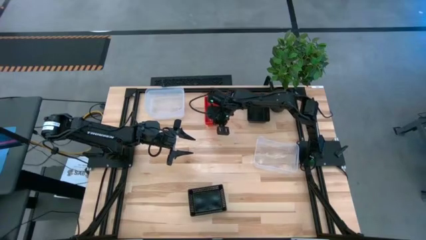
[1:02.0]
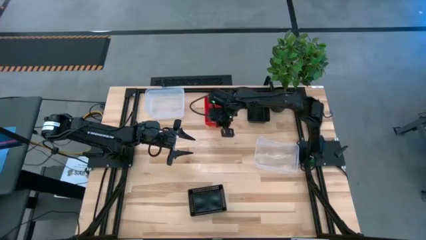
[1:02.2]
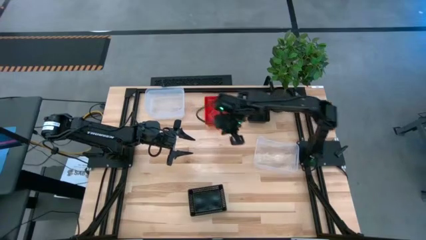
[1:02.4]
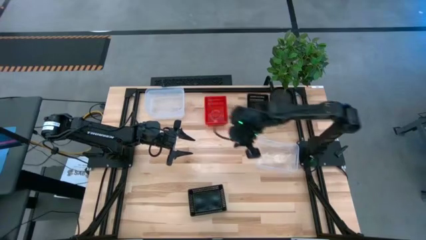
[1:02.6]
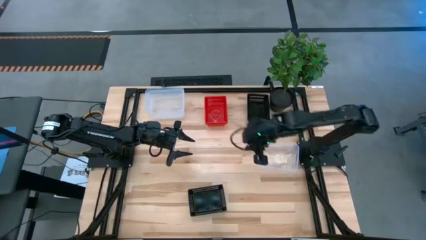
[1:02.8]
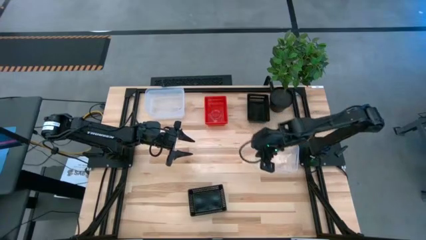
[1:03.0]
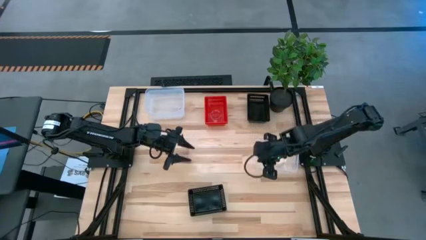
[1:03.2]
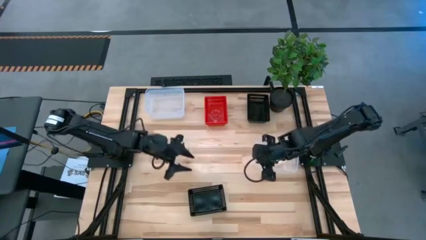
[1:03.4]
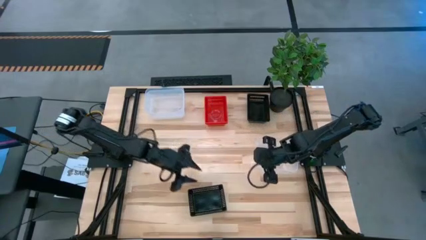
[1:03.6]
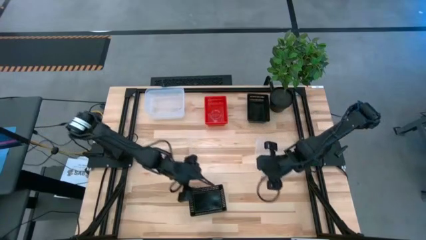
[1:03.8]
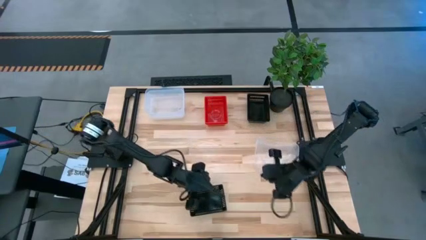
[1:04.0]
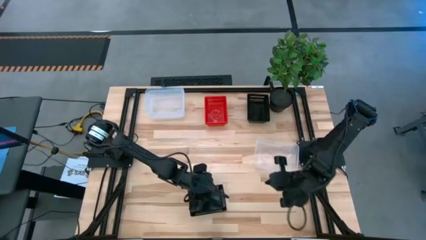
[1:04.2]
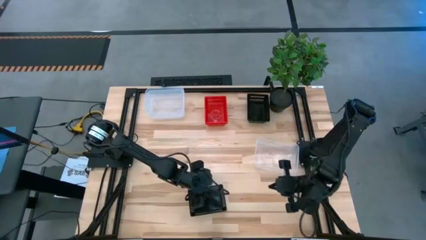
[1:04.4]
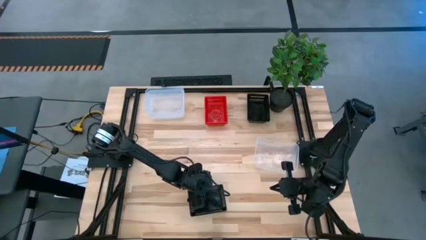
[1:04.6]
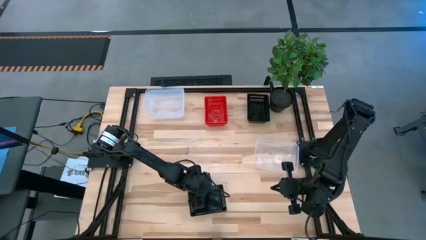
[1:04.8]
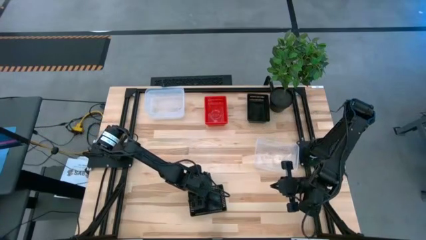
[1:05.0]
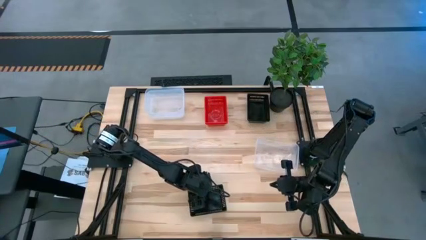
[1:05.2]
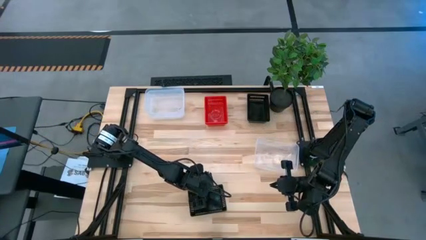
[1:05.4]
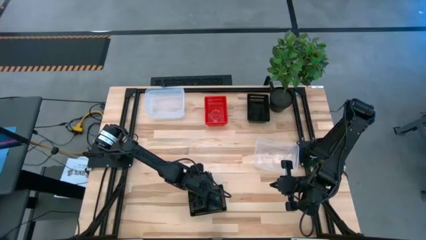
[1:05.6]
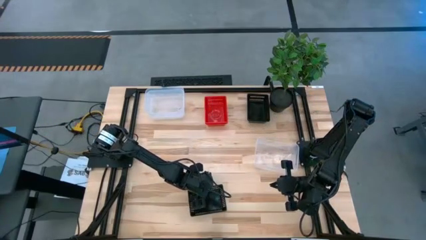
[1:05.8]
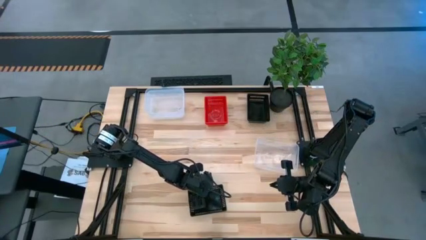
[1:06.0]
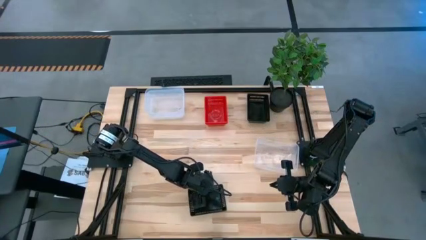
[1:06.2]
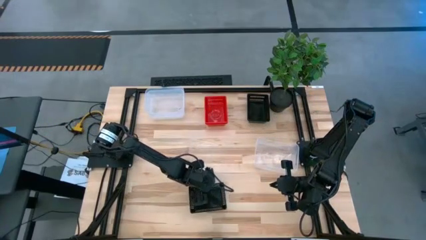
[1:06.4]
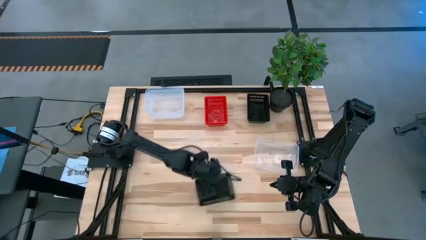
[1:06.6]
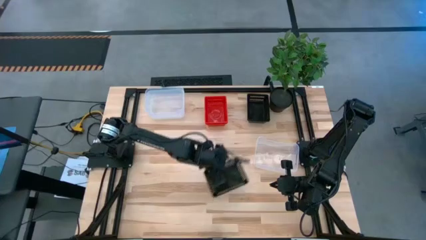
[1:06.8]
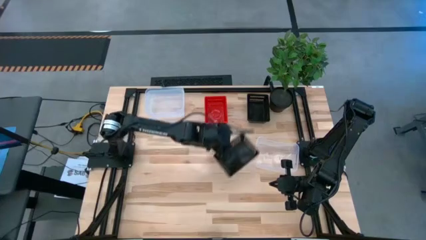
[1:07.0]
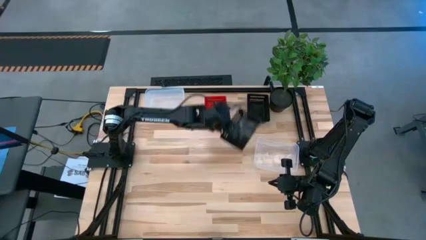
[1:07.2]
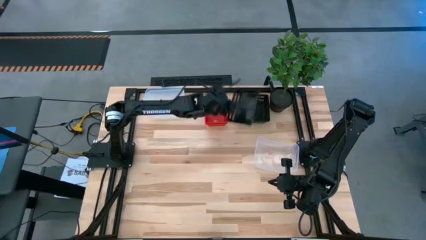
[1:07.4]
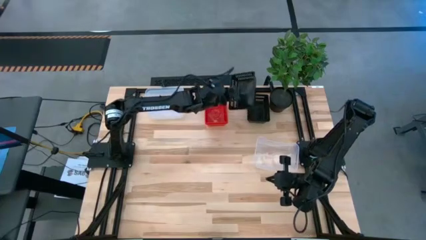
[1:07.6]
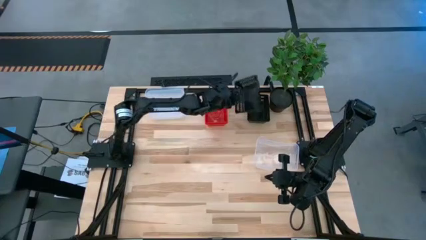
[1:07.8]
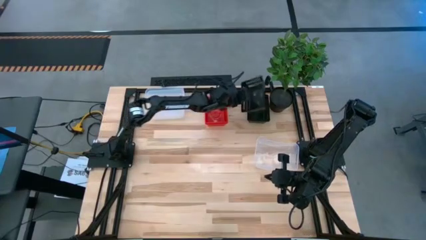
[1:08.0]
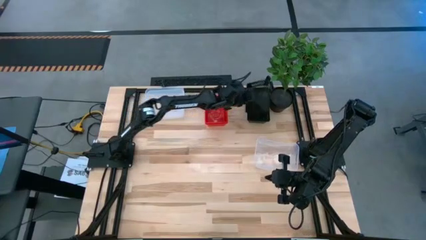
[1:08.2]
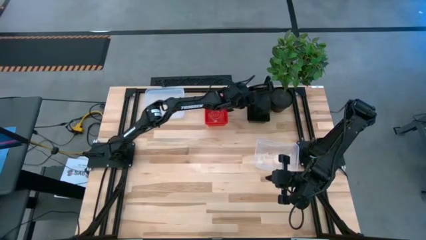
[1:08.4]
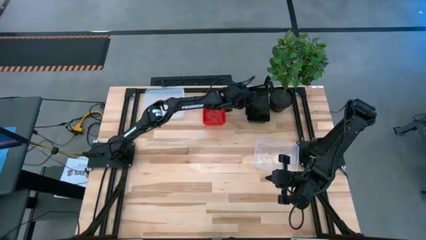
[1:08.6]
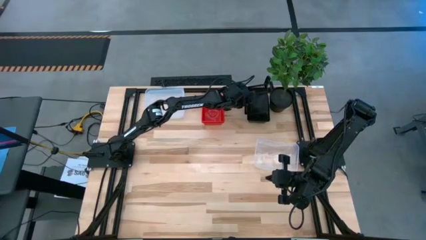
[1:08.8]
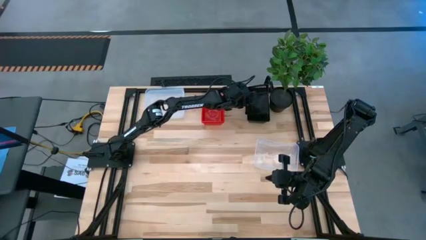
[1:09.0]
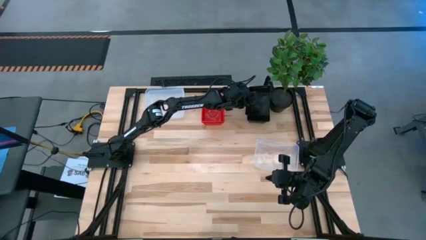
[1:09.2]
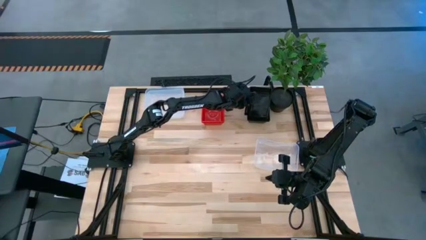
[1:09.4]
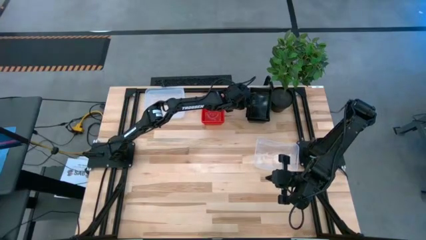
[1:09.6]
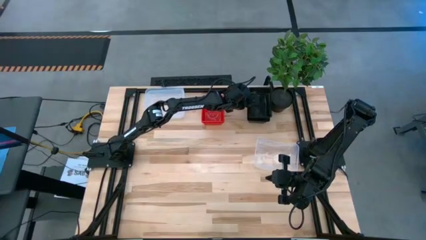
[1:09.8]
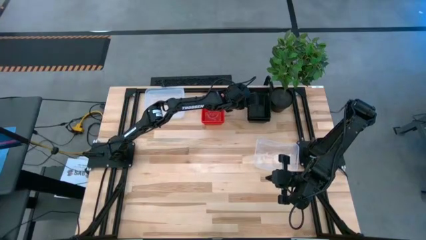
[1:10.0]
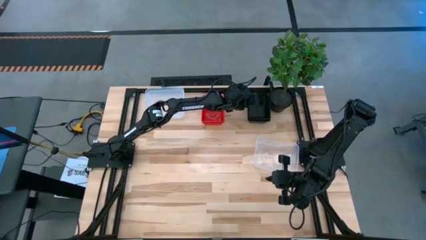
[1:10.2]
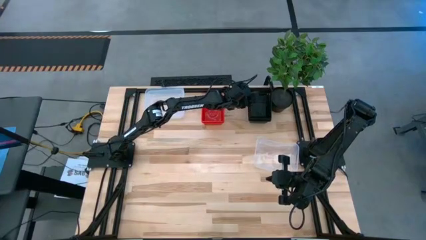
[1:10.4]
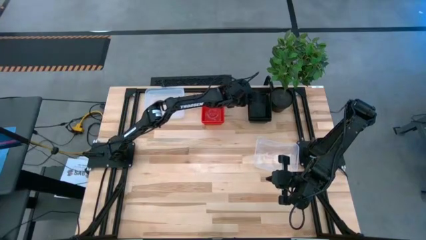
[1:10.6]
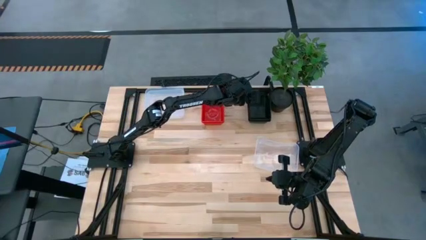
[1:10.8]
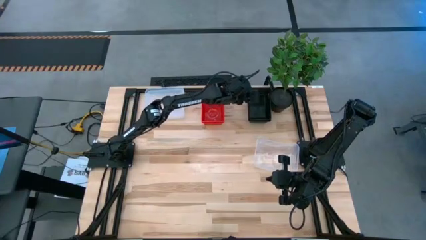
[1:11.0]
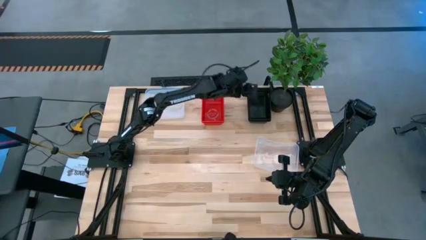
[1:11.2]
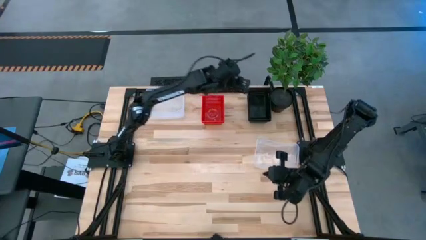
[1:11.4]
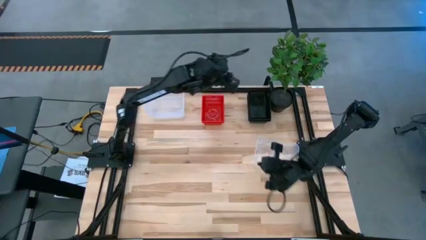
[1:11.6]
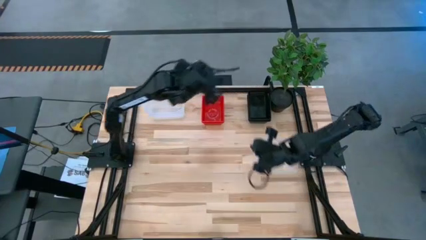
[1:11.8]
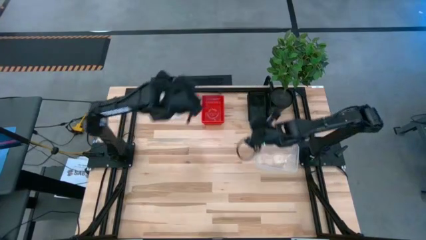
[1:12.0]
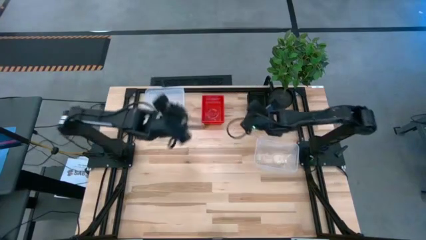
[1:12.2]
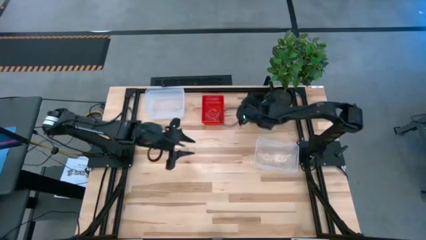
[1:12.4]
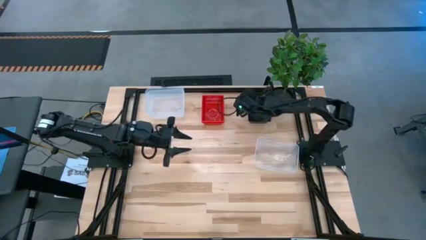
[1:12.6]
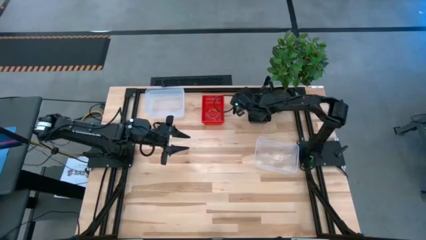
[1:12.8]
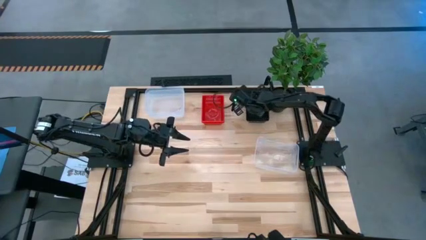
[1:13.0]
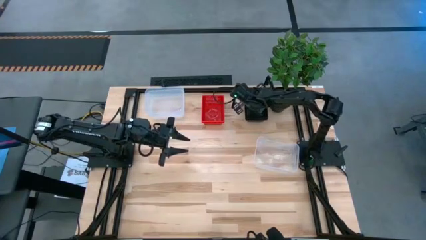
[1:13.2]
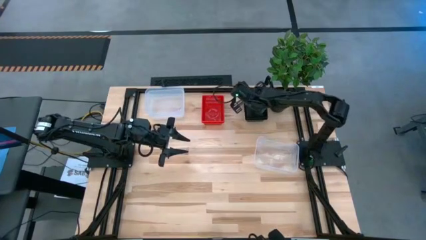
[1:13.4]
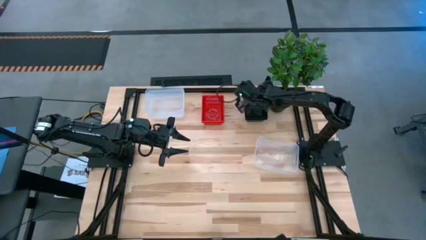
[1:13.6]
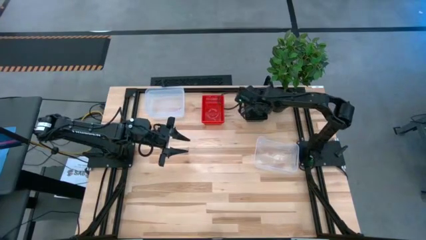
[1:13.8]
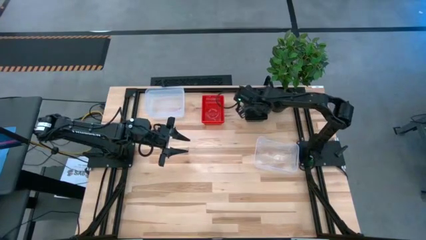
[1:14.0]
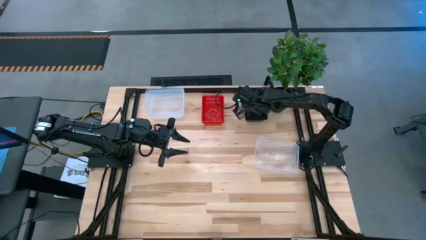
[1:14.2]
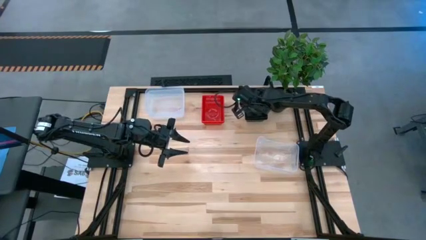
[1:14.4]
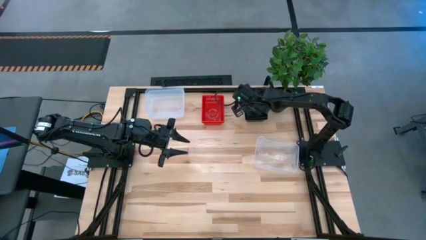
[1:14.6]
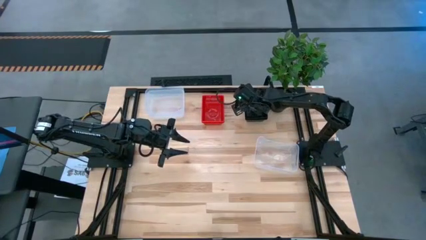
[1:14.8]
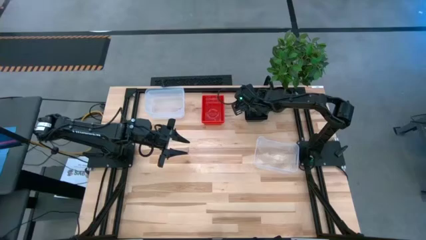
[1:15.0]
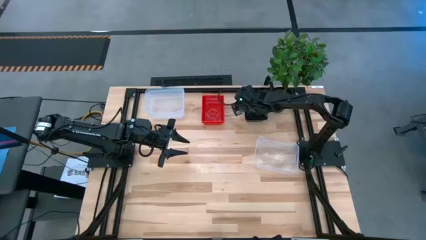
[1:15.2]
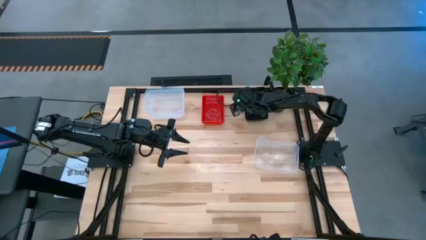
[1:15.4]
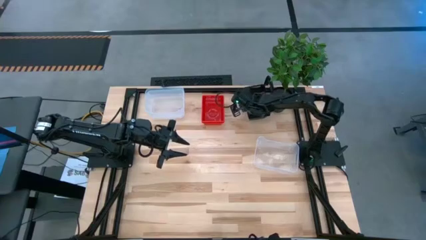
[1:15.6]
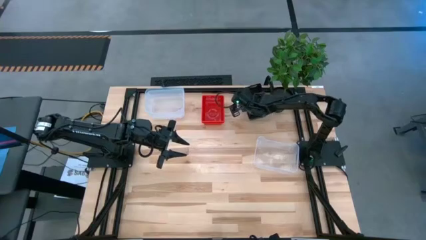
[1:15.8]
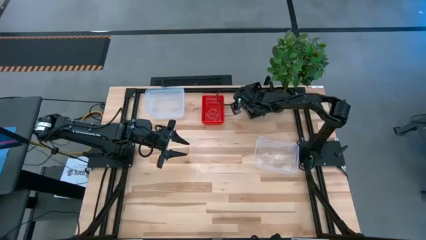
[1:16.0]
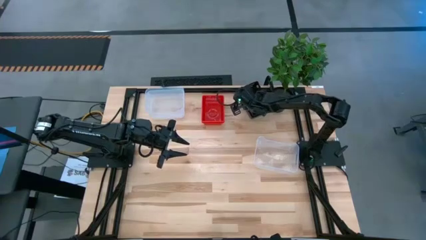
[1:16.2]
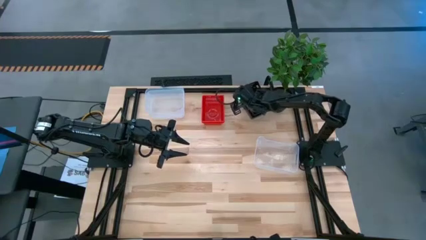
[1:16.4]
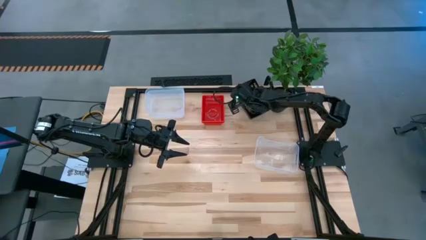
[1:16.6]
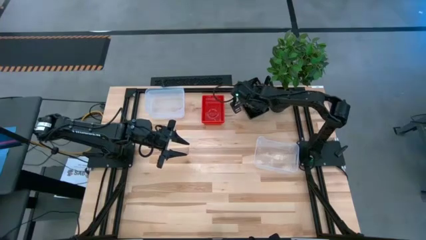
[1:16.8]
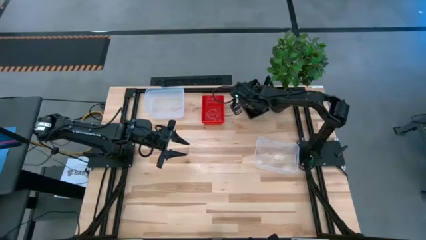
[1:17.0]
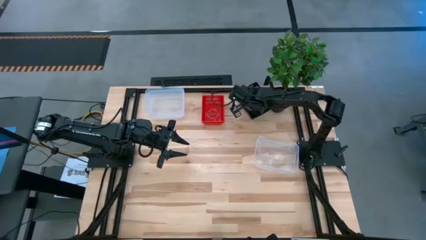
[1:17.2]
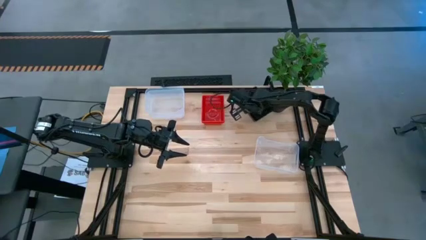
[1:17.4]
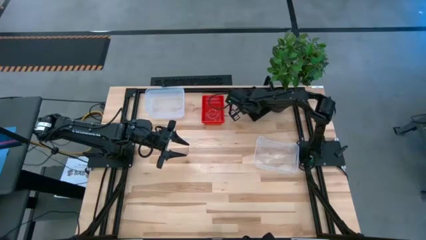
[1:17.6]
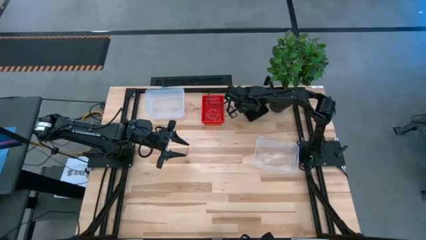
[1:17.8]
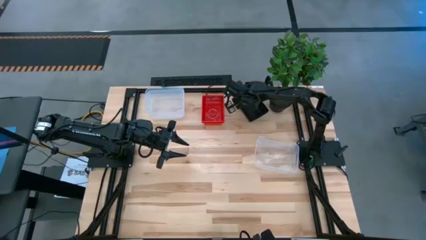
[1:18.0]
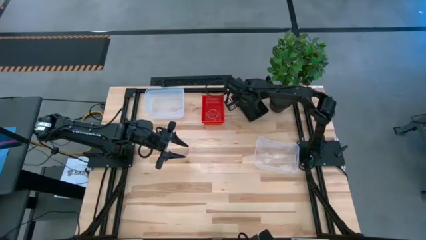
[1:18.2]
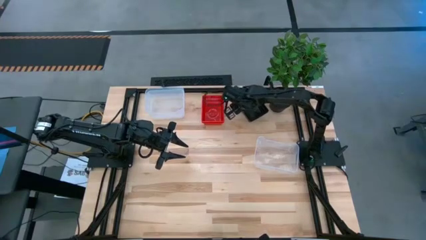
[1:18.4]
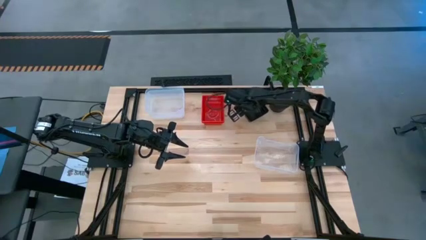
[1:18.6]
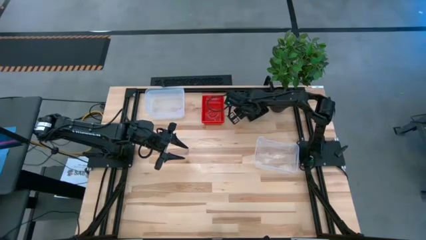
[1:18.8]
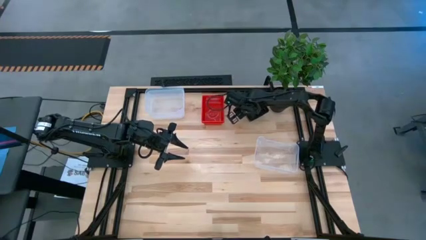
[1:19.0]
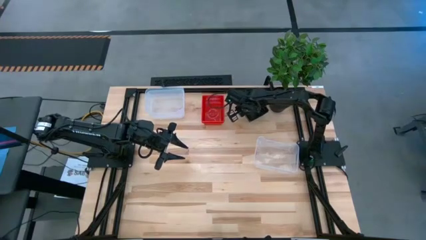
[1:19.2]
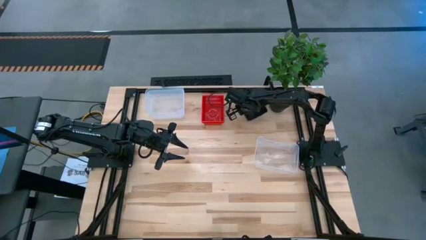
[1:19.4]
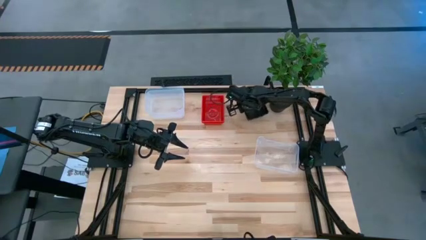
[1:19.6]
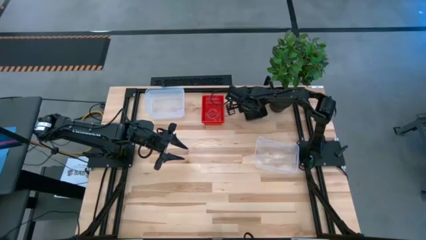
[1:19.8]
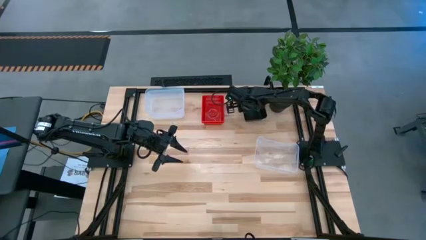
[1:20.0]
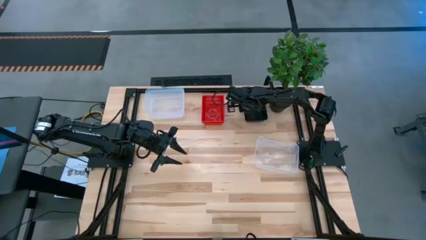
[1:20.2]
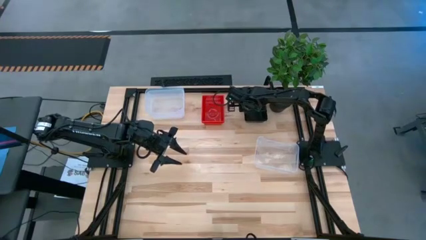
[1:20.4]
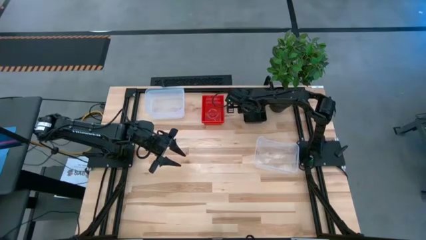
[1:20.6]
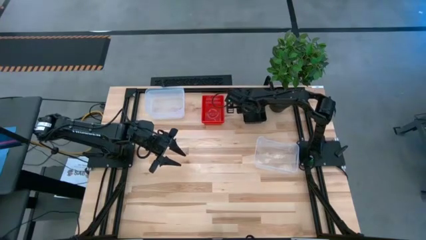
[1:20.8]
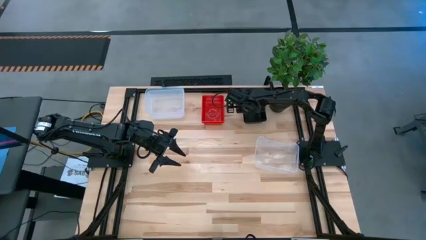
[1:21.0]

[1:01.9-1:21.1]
Stack the bottom black basket on the top black basket
